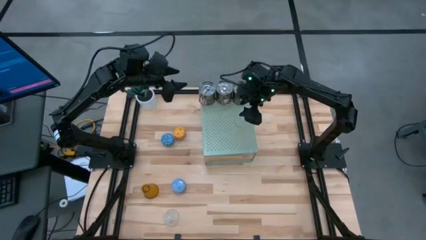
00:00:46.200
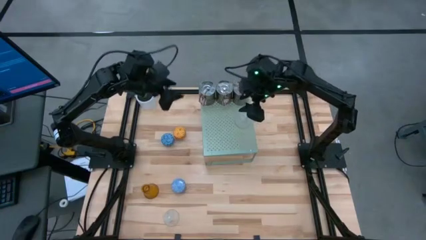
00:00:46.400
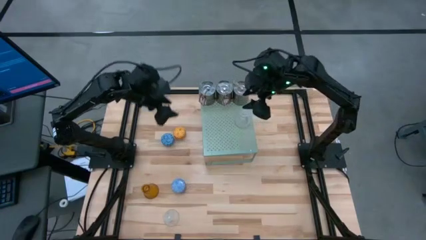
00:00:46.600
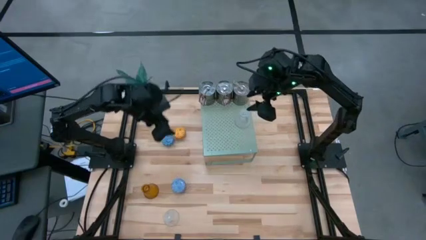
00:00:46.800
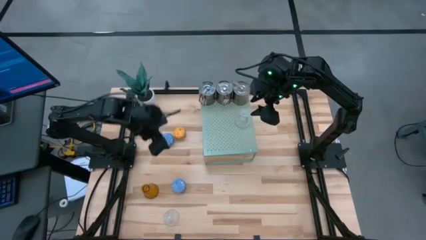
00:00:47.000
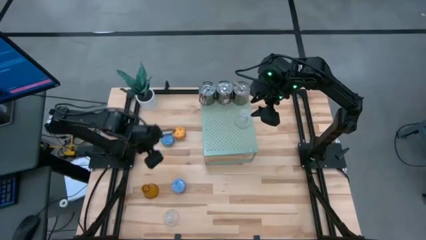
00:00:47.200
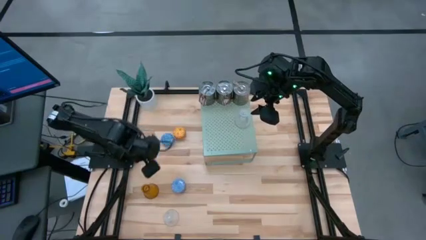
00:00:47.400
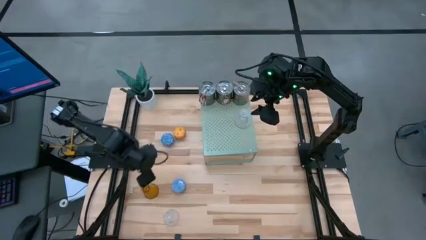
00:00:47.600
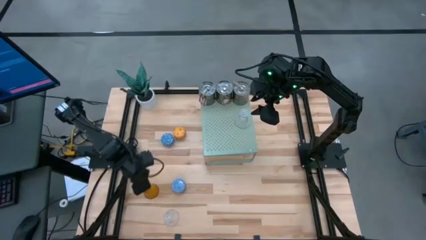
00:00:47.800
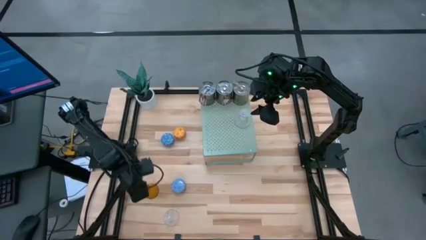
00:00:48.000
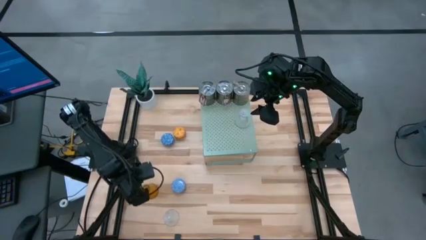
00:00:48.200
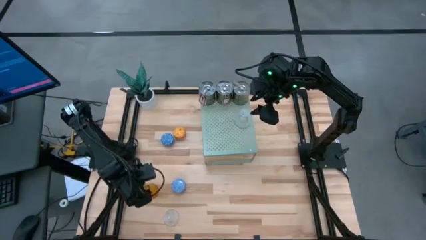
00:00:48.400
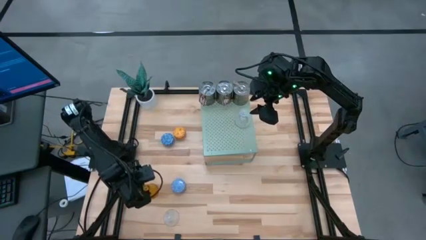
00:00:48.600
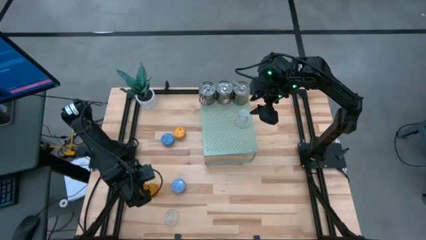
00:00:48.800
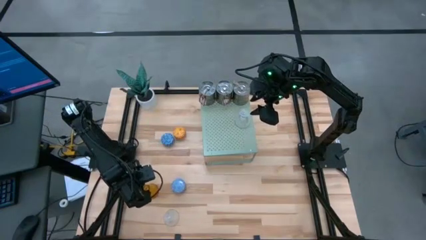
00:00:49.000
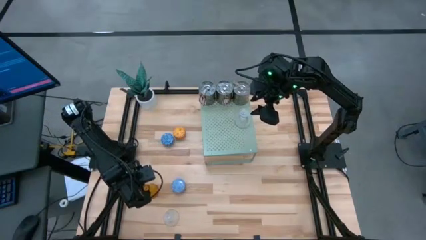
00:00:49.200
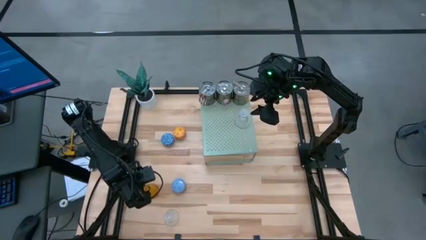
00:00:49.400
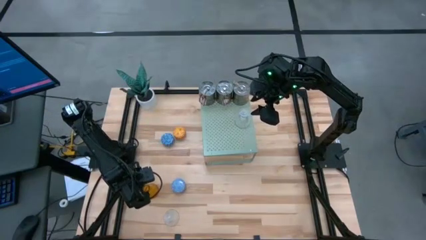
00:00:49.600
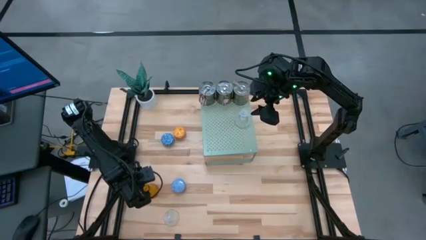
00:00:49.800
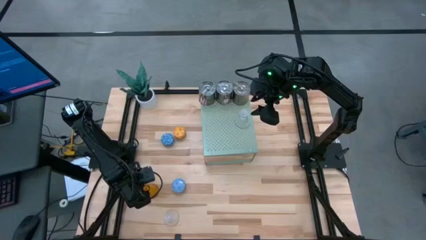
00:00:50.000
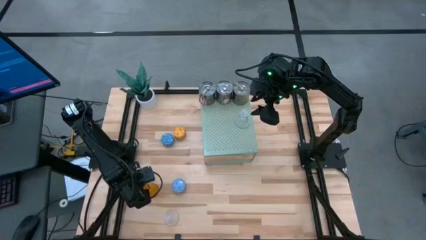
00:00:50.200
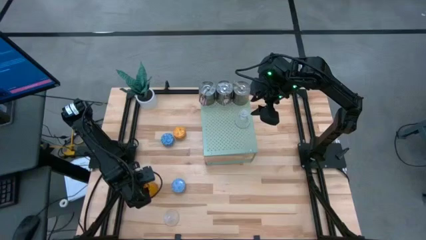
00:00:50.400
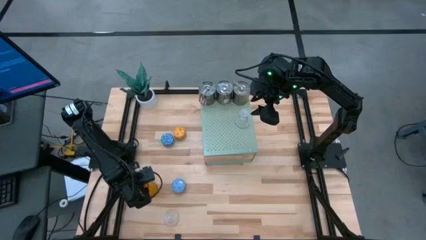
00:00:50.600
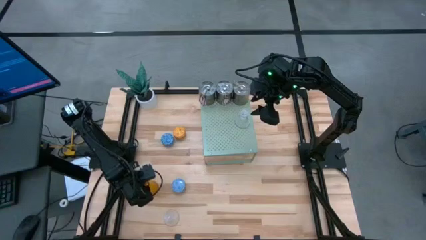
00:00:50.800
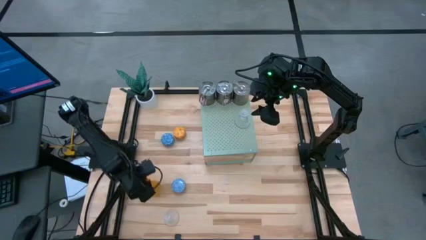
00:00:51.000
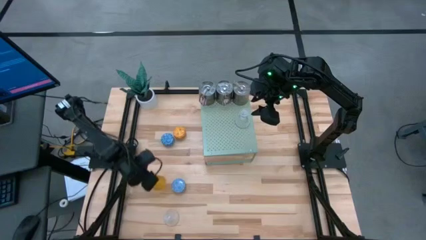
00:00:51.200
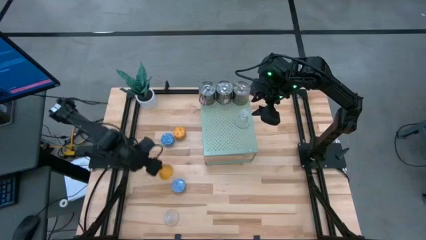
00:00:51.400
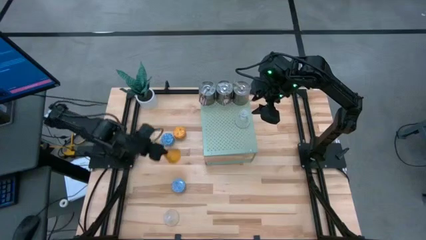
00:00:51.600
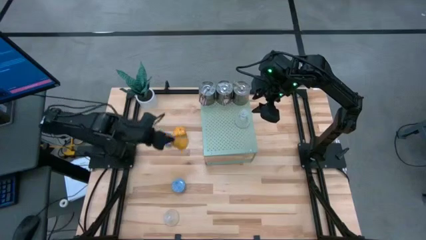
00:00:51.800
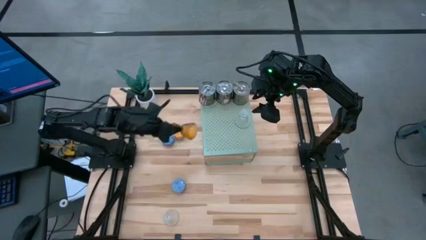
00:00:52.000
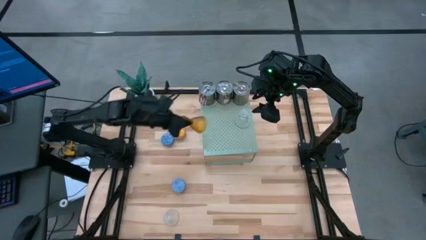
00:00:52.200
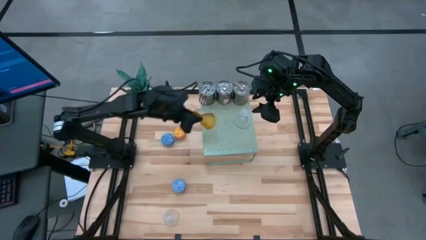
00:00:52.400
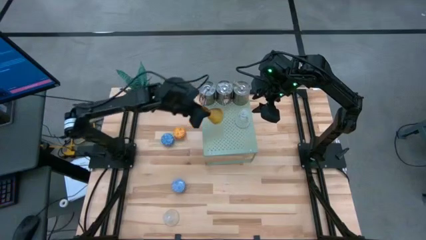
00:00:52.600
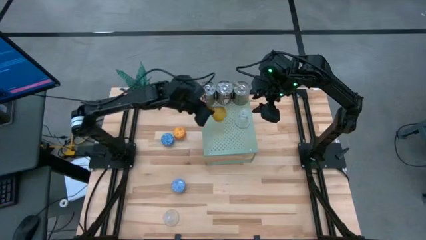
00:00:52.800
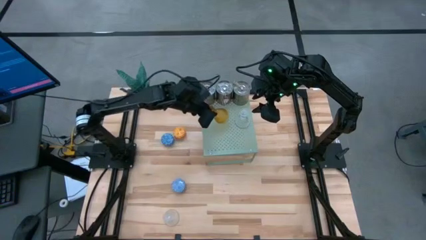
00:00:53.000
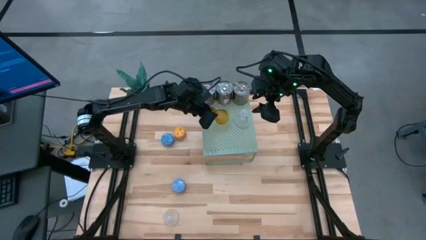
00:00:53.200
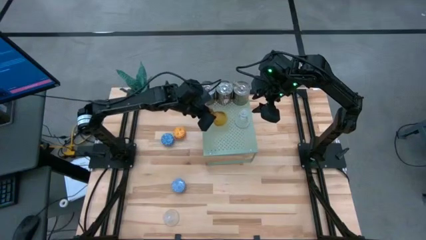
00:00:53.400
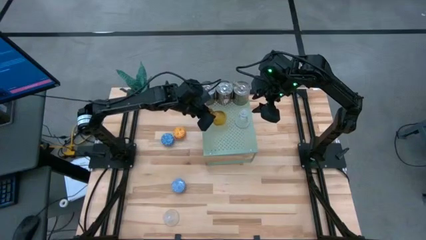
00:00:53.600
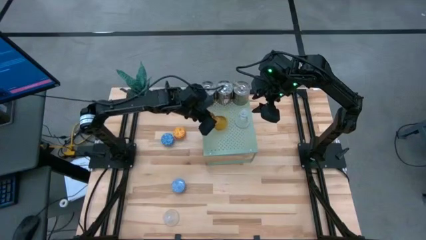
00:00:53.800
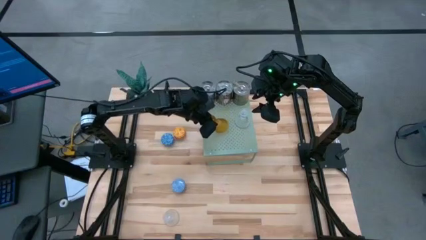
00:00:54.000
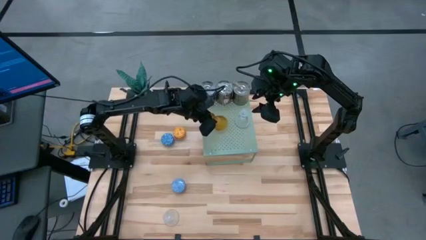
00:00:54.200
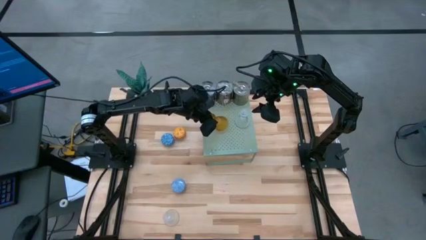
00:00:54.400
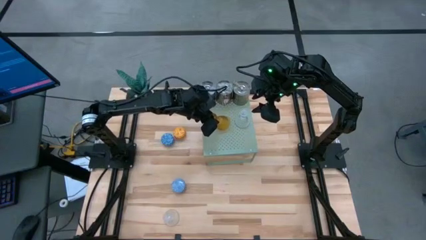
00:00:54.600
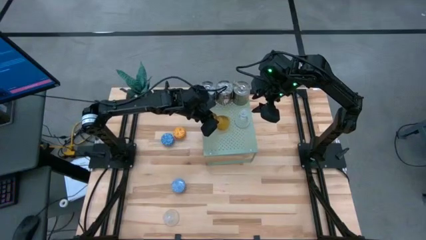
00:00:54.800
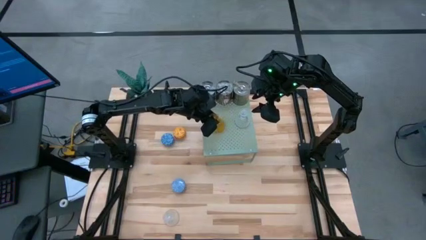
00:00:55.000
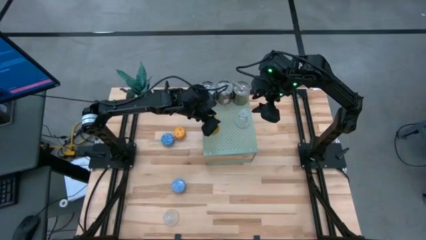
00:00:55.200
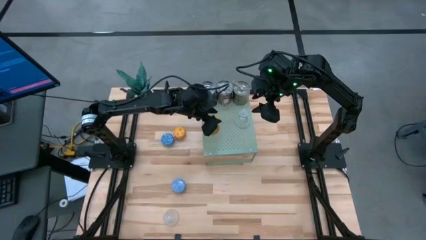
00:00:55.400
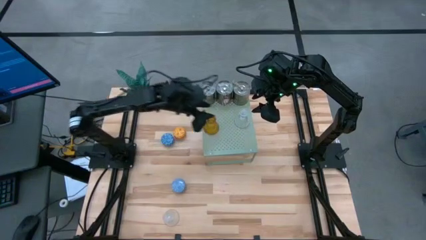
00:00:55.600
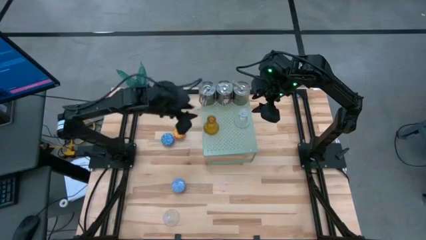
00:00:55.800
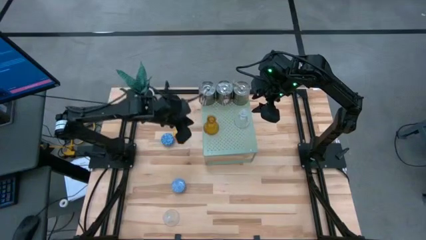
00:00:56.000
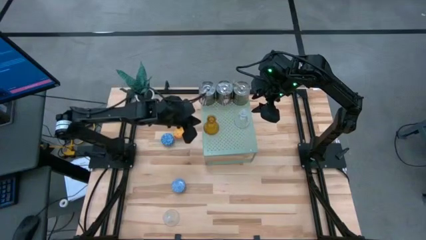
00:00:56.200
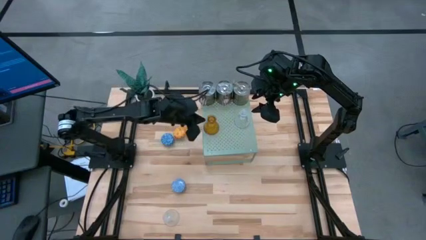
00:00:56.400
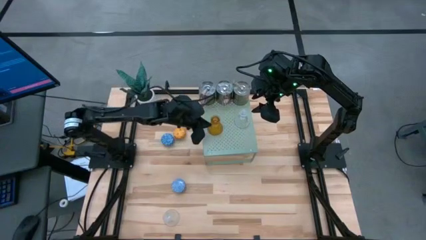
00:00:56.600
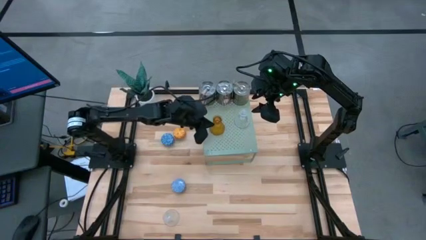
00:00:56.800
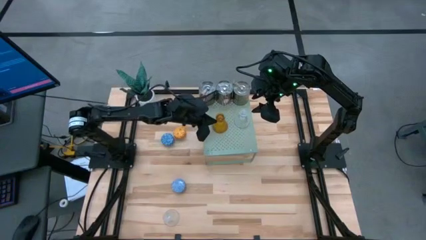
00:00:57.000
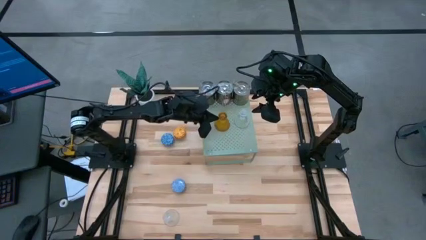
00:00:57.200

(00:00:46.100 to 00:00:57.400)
Task: Pick & Place candle stick holders
Put the yellow candle holder on the shelf

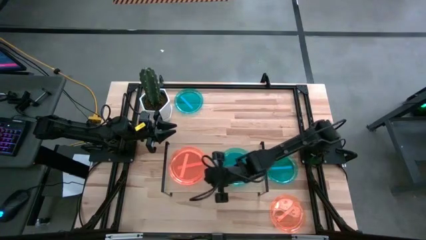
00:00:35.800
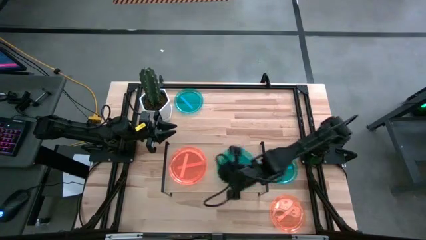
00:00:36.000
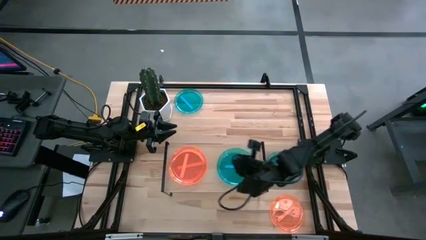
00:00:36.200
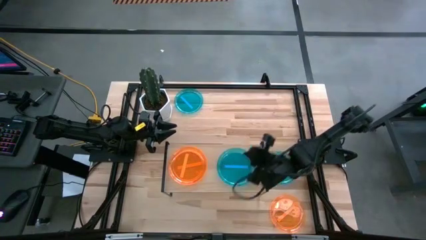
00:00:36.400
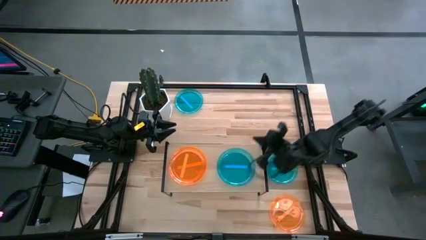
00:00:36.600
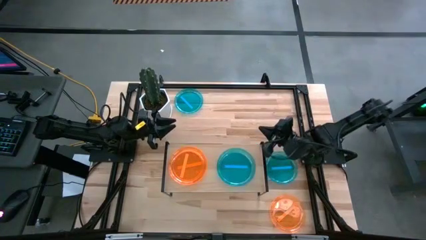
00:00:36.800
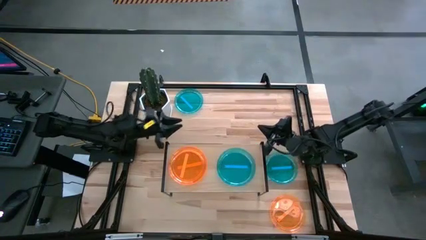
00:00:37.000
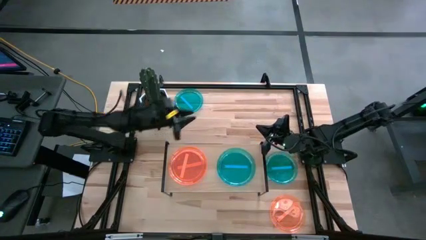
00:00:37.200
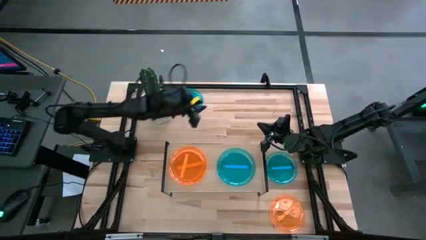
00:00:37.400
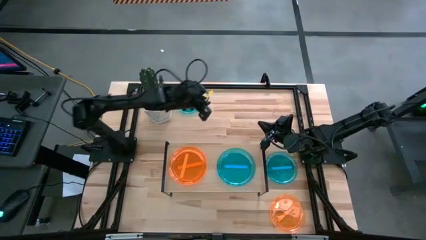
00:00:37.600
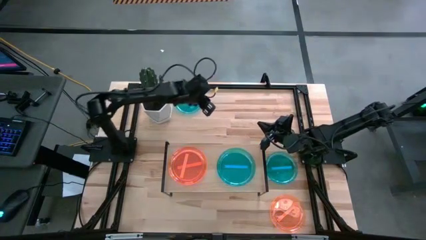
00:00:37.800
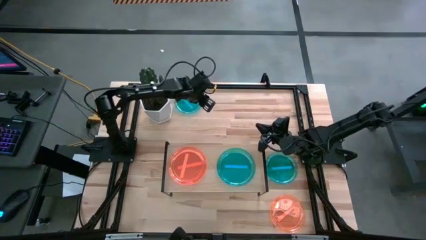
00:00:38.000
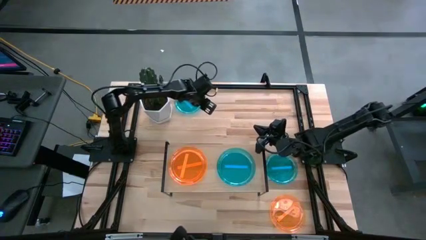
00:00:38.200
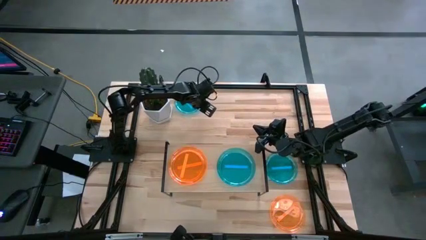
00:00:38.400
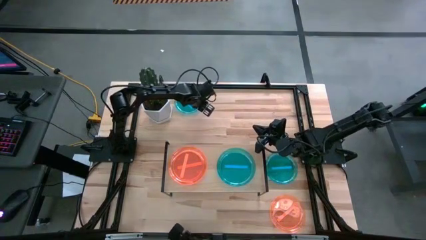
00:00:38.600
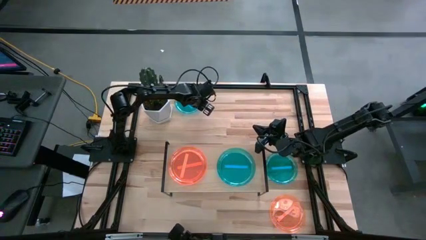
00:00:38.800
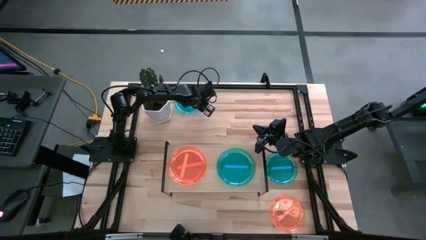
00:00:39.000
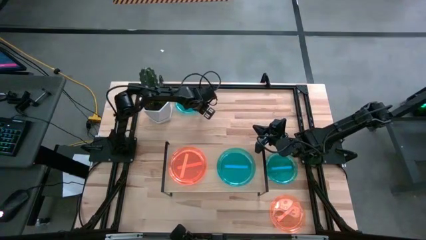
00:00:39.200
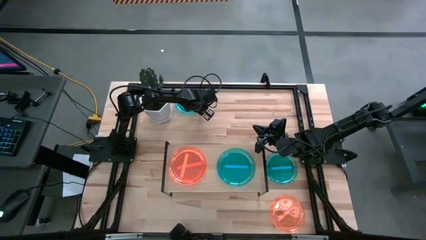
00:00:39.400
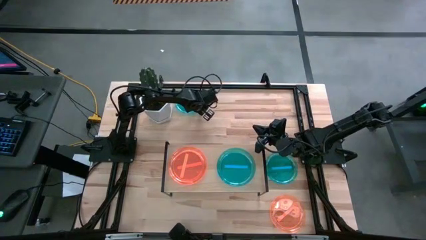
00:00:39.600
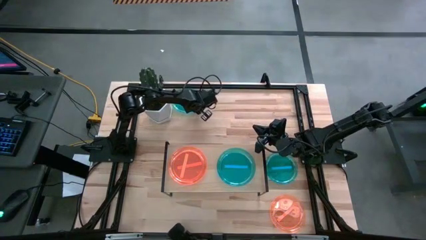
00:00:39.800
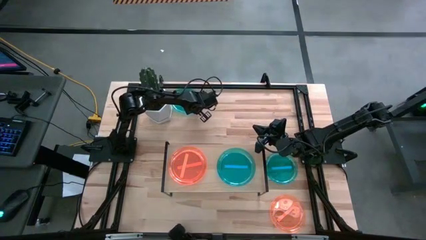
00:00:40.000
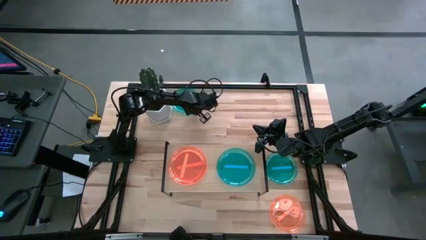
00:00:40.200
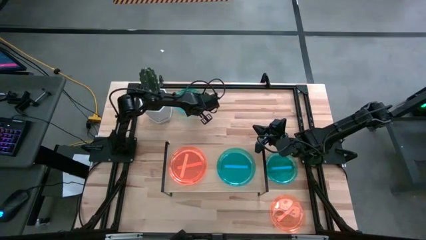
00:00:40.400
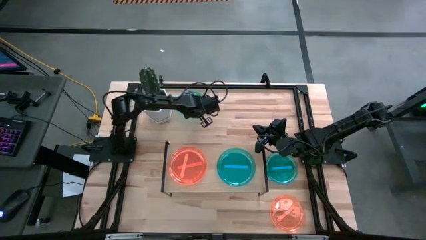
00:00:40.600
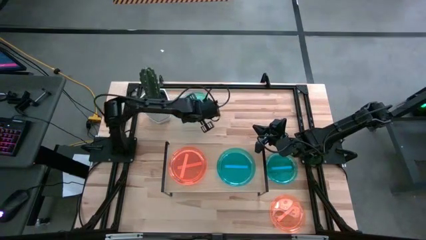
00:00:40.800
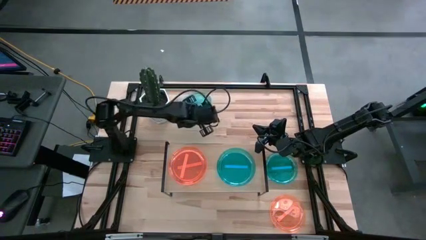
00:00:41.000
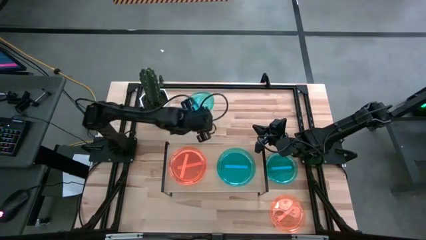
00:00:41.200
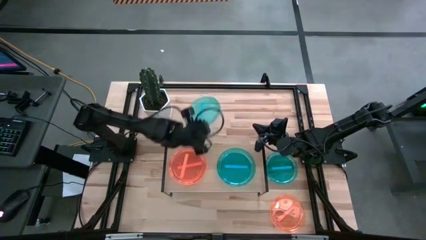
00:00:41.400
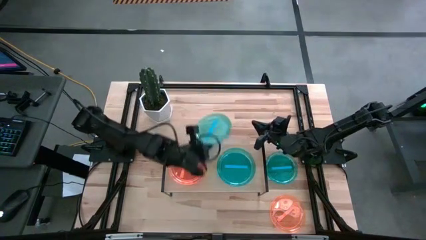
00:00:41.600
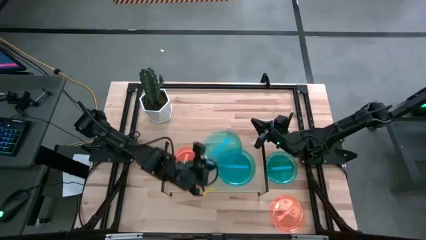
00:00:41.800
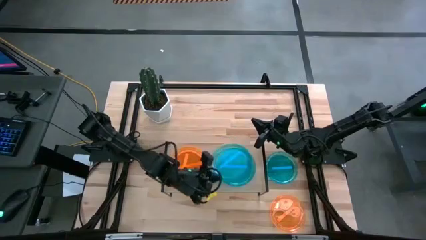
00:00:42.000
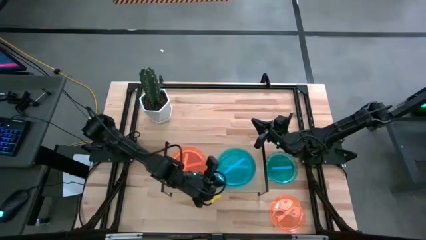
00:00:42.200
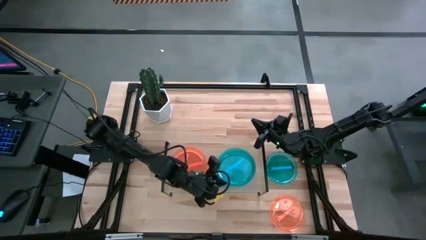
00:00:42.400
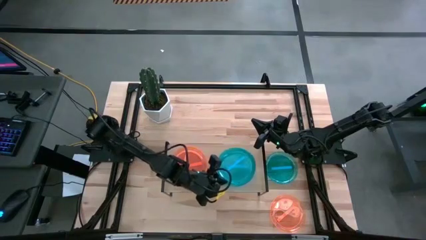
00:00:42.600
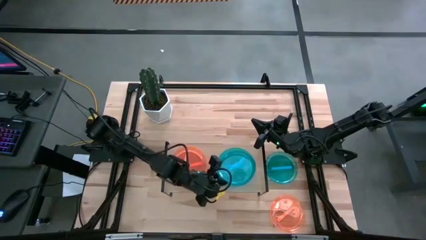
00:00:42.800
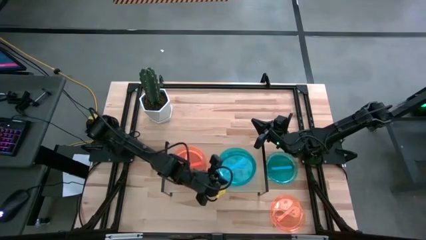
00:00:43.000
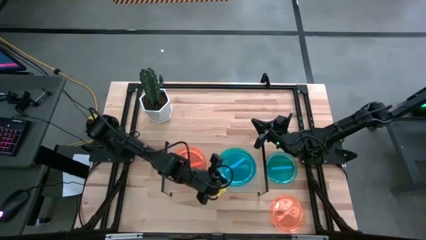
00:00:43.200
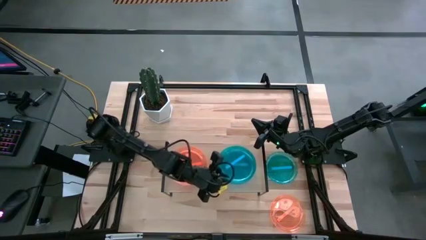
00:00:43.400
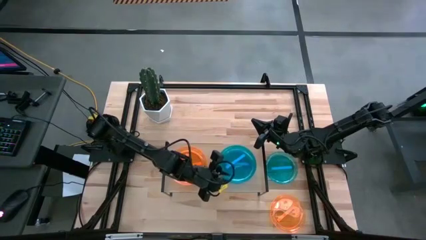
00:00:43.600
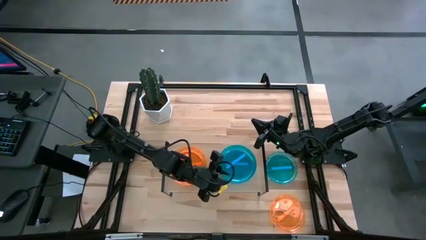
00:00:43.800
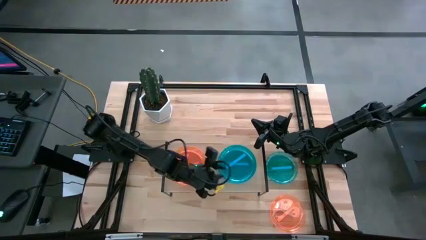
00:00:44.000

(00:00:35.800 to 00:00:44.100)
Task: Place and stack plates onto a shelf
Stack the top blue transparent plate on top of the blue transparent plate
